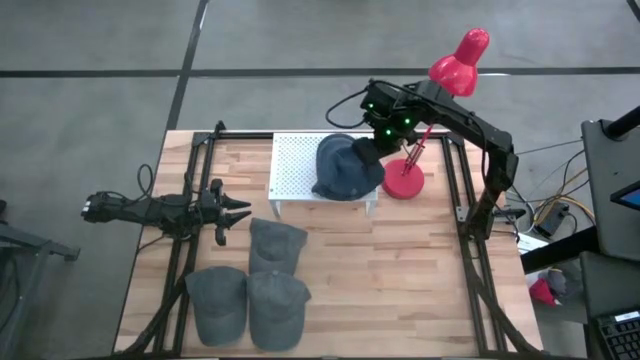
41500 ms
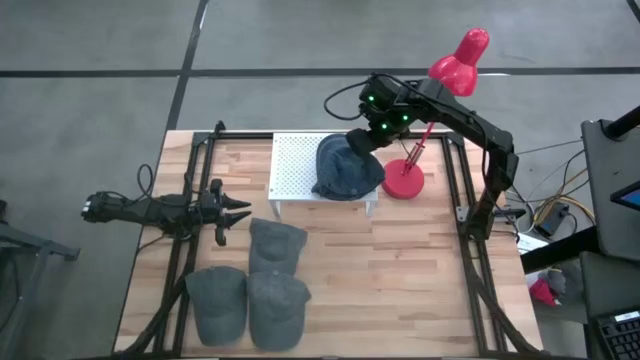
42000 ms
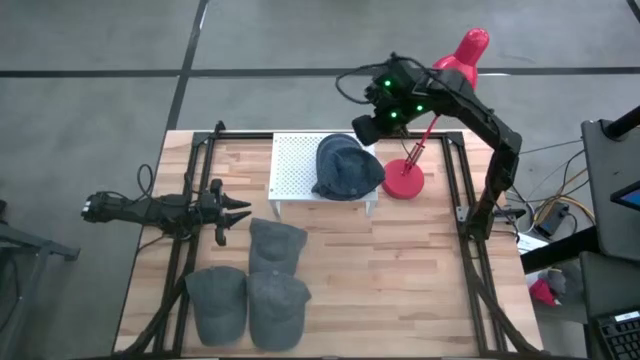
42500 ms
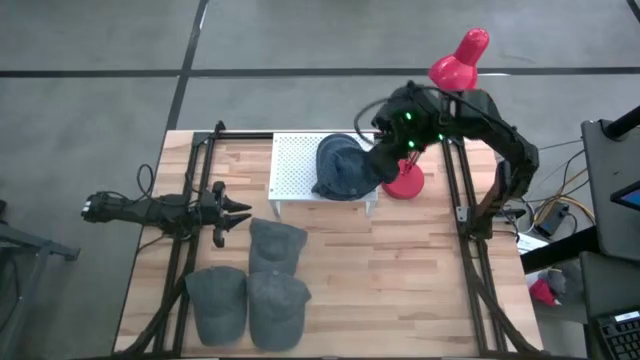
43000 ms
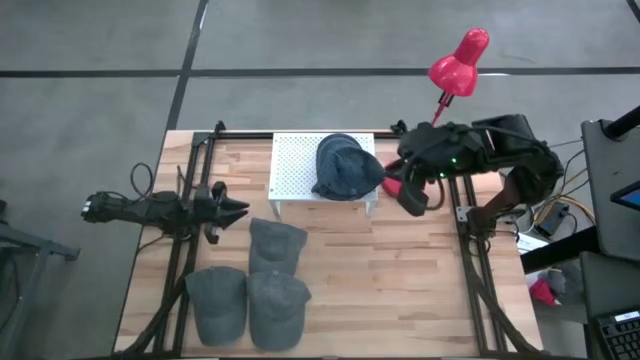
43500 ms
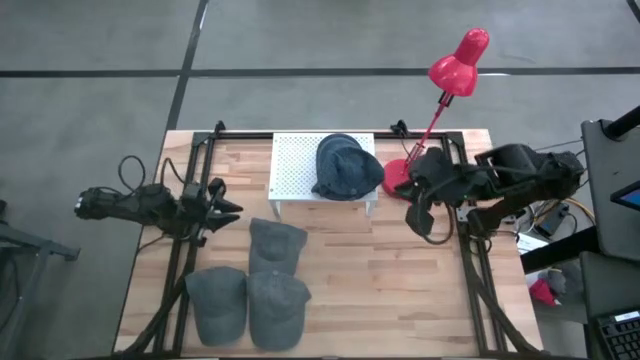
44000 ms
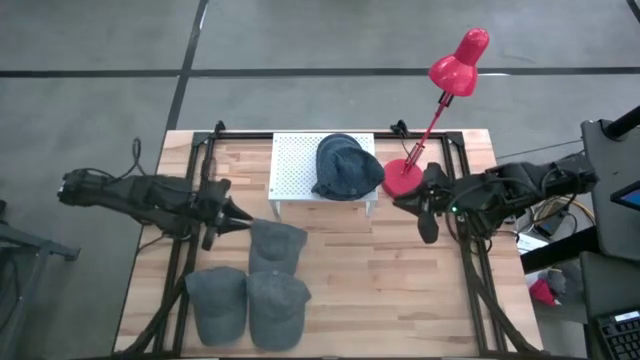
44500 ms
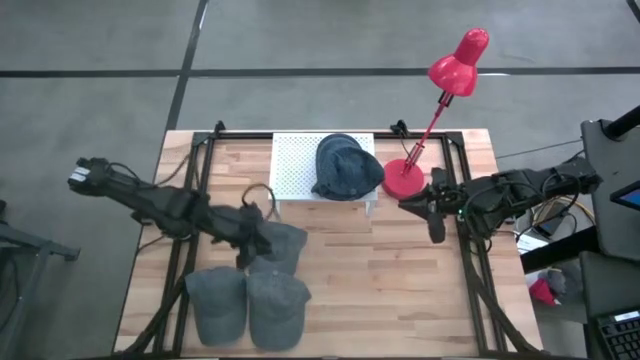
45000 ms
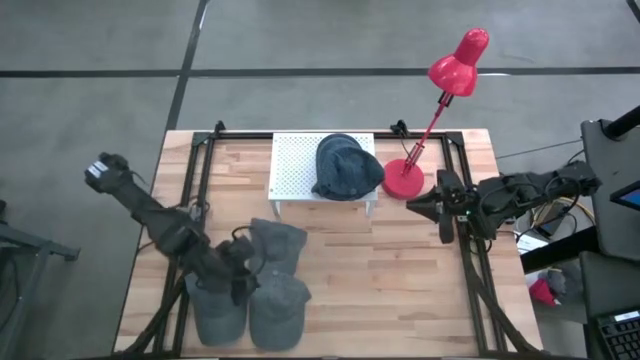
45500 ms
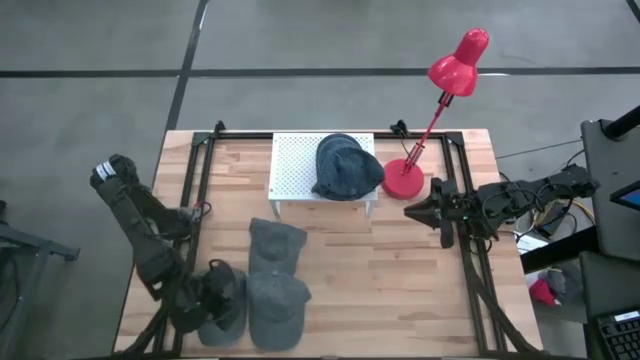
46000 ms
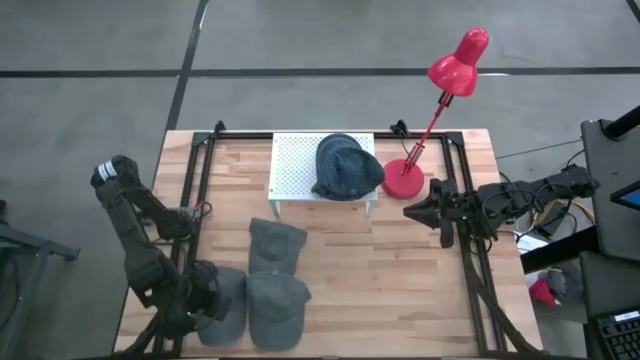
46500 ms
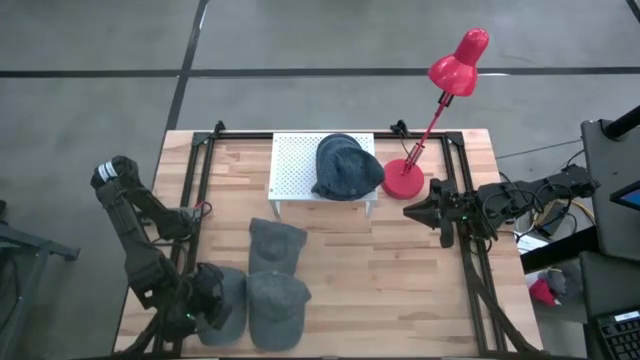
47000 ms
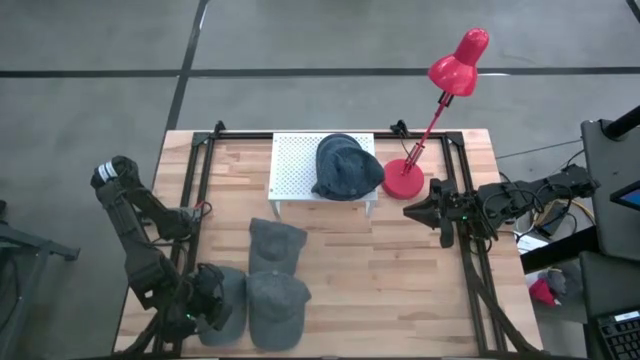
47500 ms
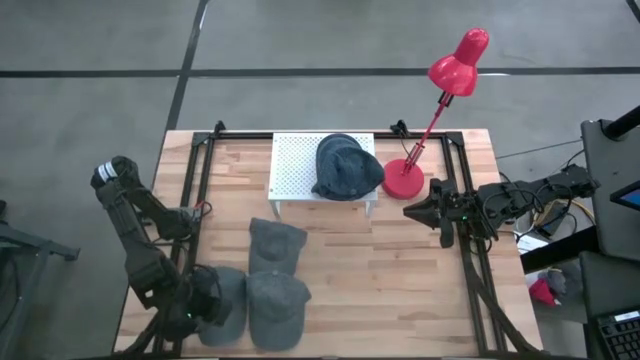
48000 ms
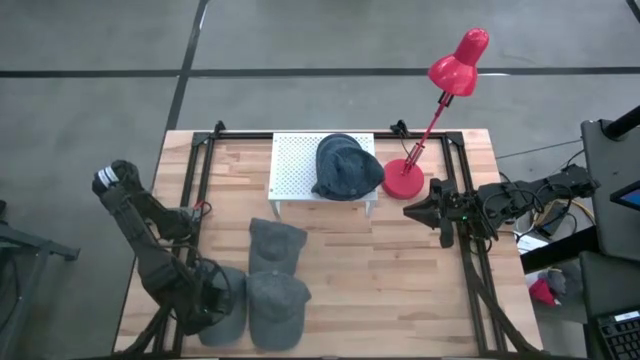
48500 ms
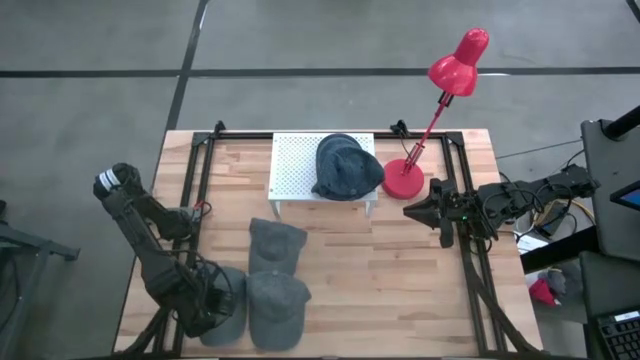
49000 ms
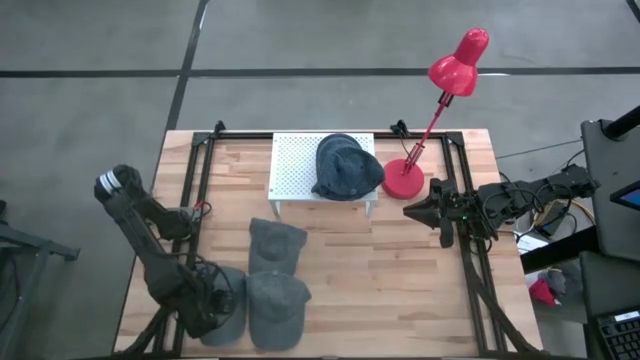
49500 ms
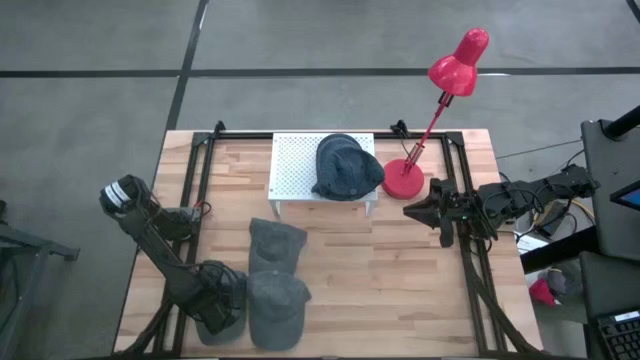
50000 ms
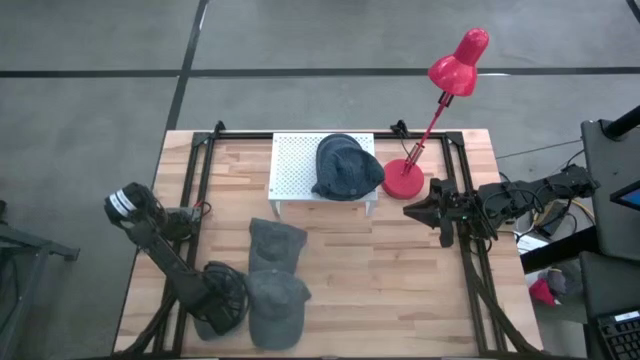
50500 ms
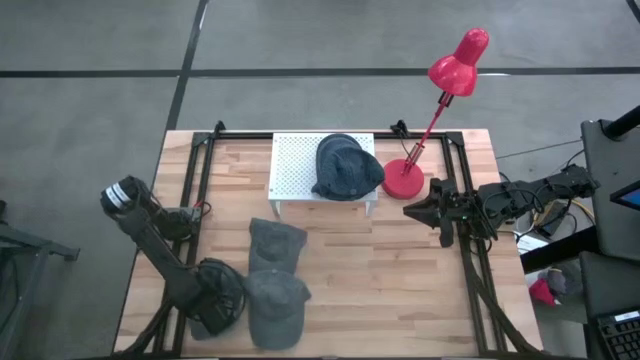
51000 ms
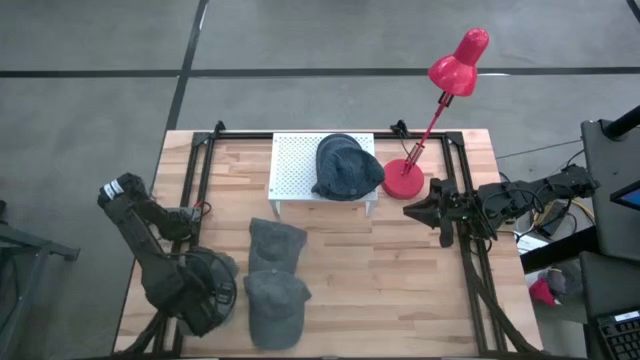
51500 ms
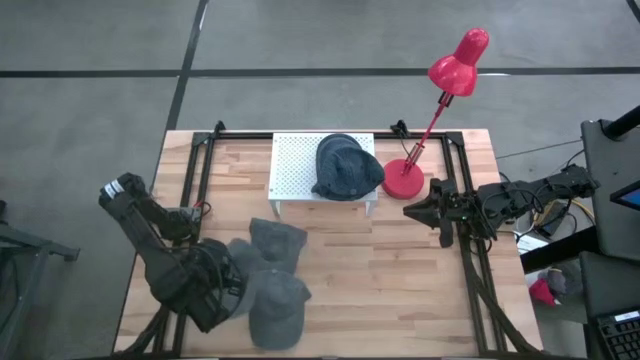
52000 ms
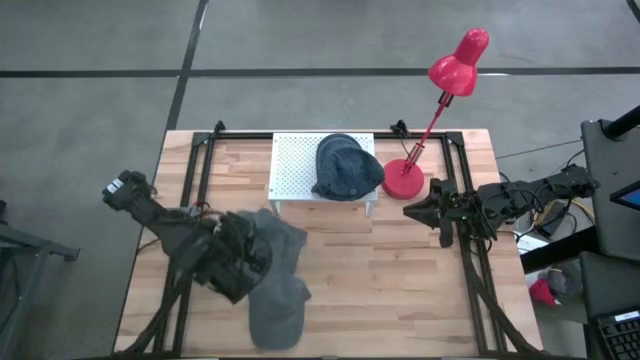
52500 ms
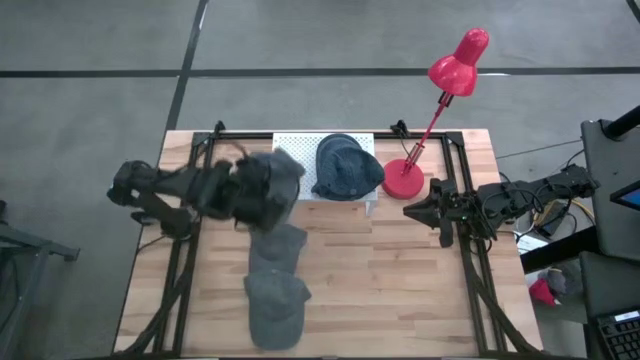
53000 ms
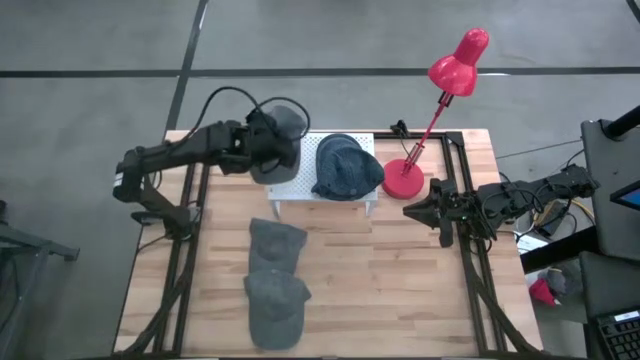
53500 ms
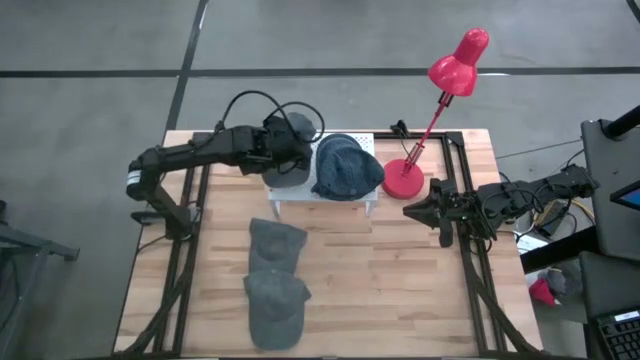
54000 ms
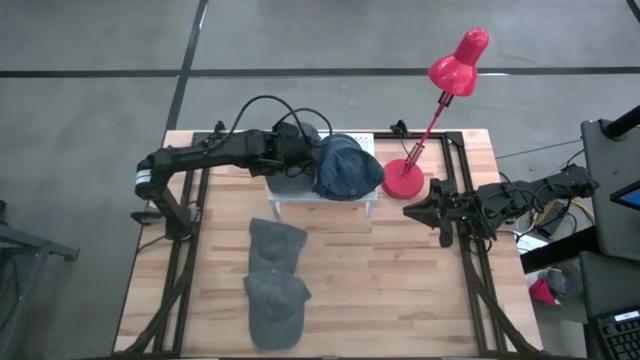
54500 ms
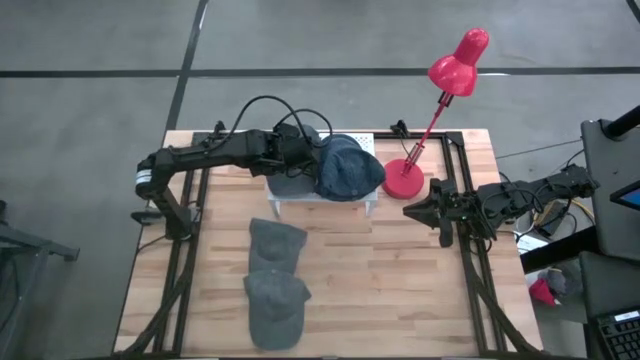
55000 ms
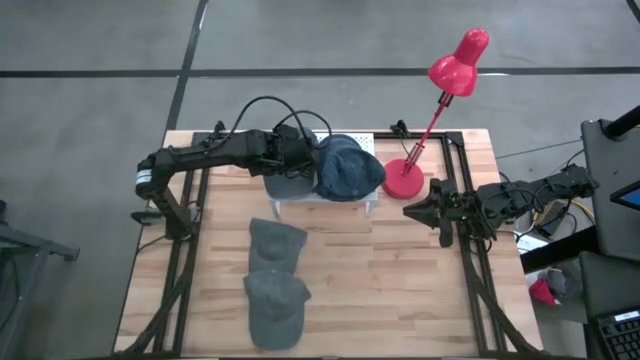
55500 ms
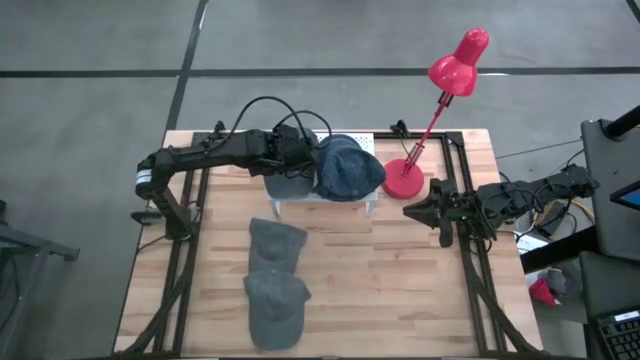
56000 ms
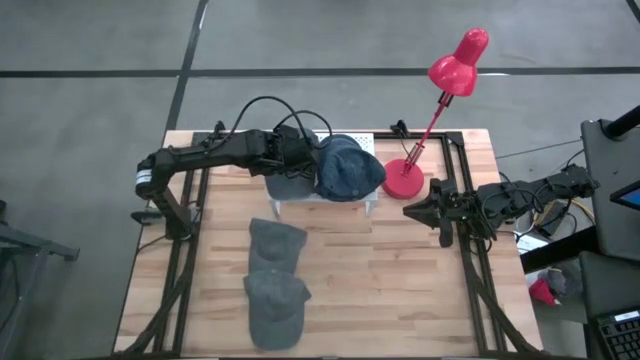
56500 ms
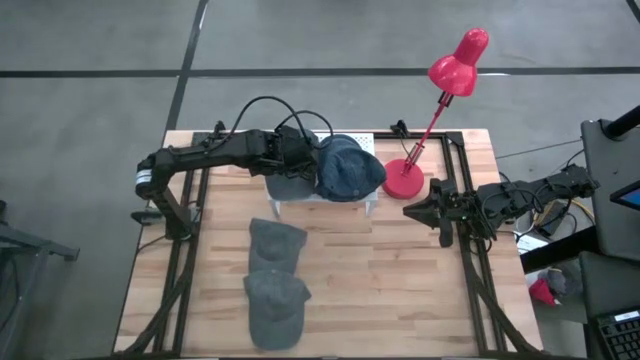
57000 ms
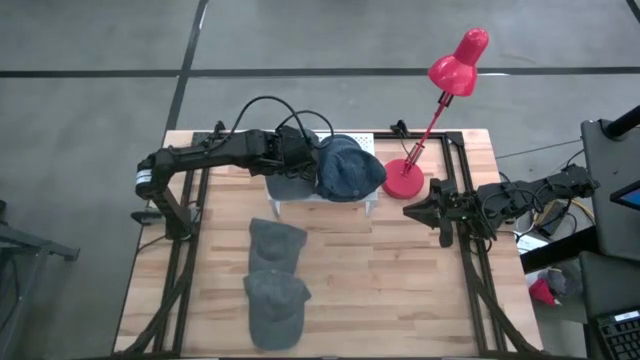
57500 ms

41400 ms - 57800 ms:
Task: Pick & Place hat
Put the left gray cap on the shelf

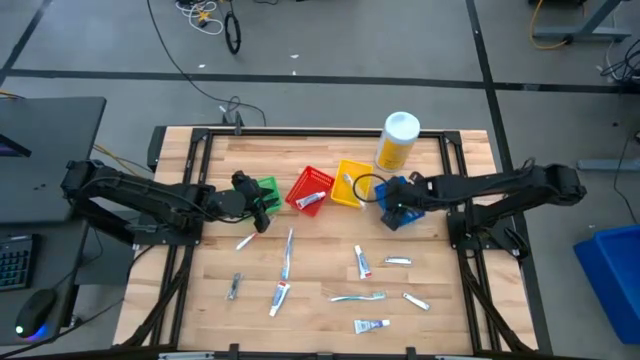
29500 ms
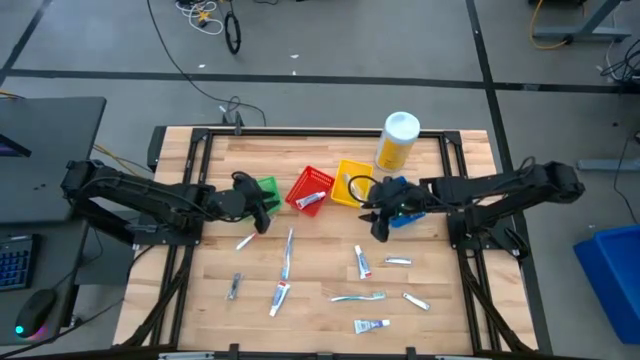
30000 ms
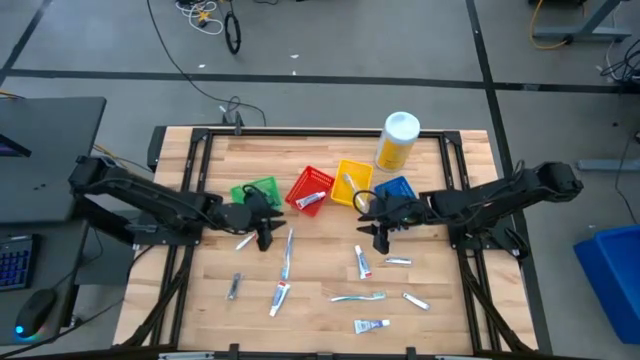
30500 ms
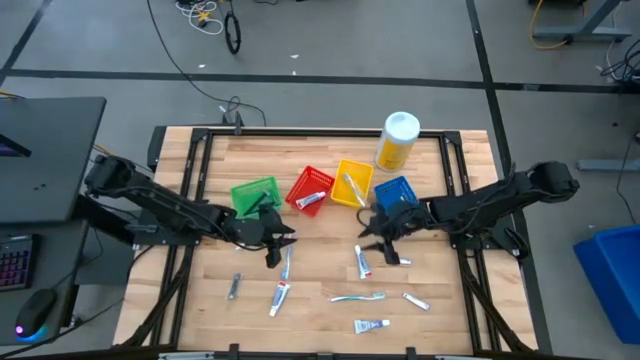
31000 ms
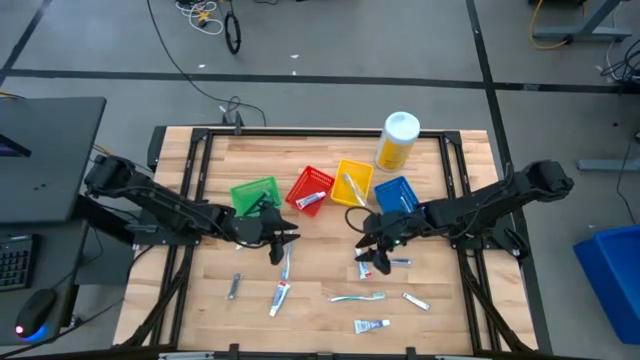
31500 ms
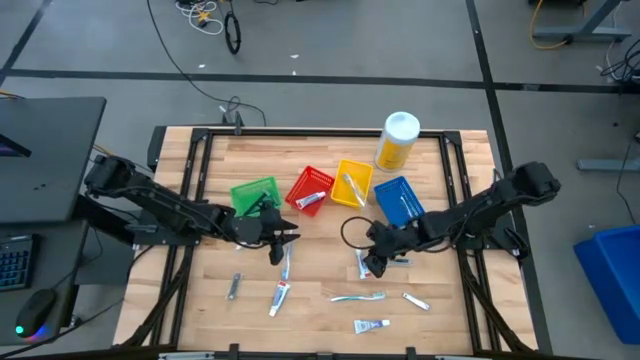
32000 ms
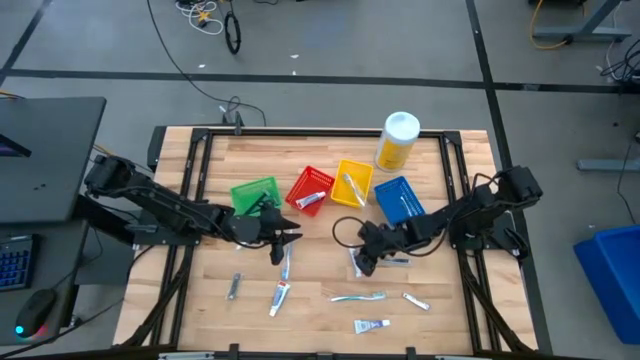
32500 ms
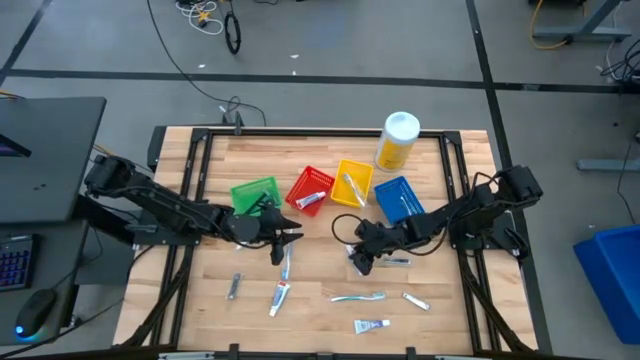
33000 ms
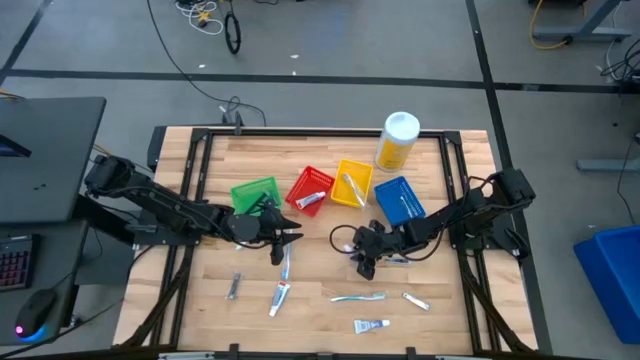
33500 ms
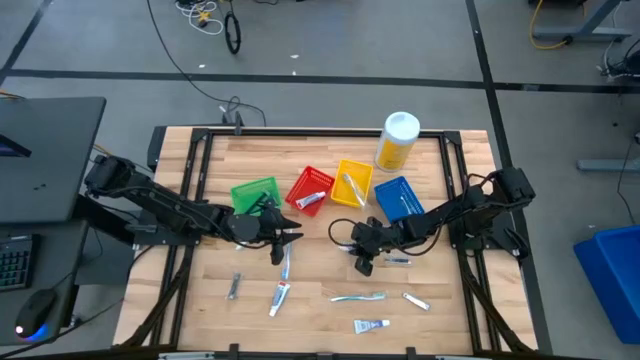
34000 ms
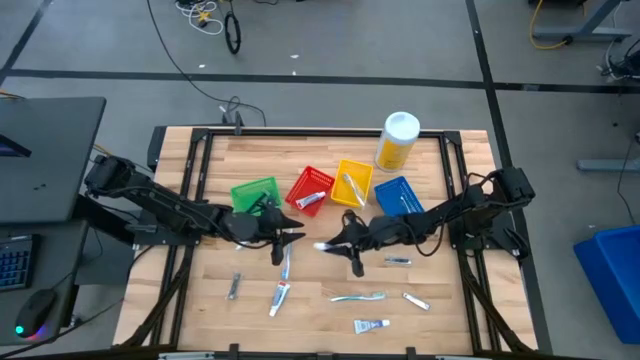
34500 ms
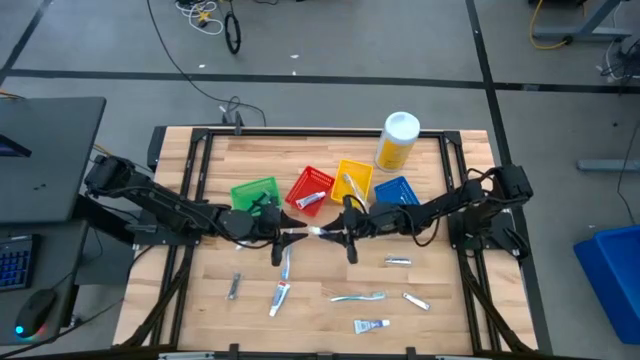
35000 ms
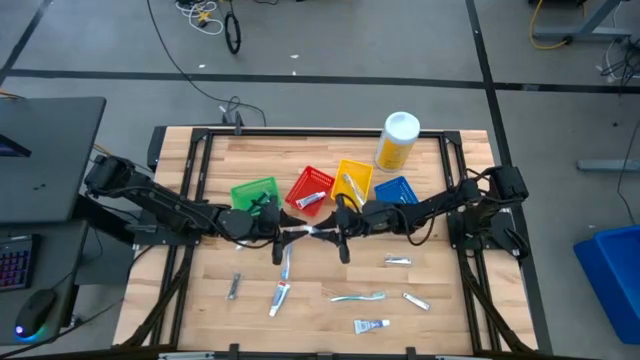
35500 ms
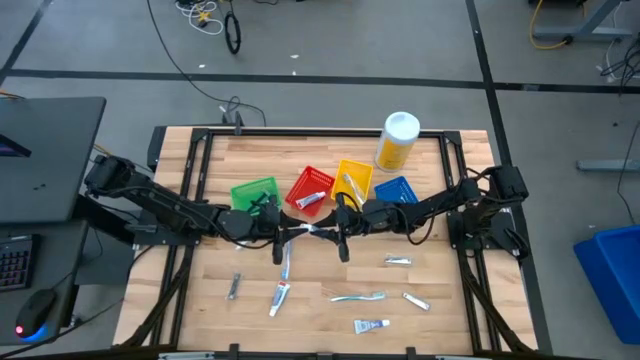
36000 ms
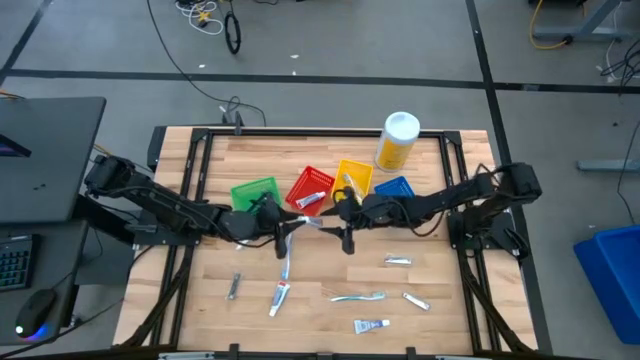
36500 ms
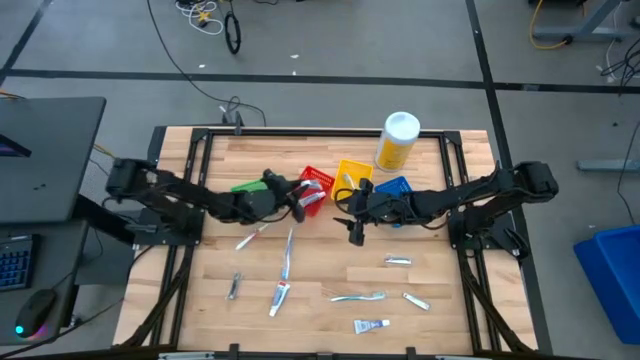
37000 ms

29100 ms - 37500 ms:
Task: Pick & Place Travel size toiletries
Put the white toothpaste into the red bin
